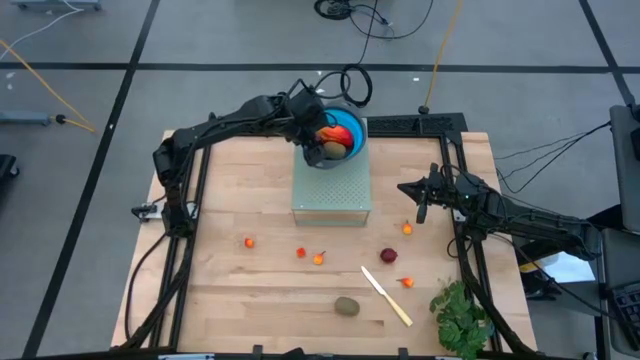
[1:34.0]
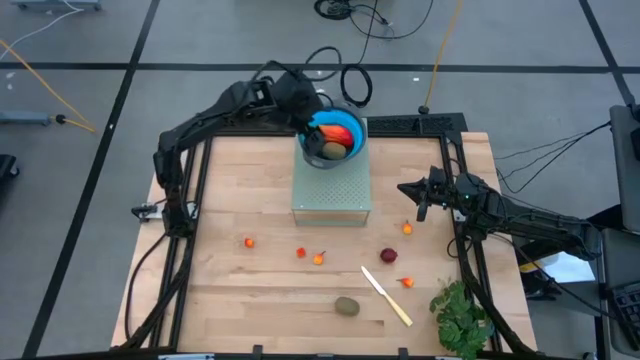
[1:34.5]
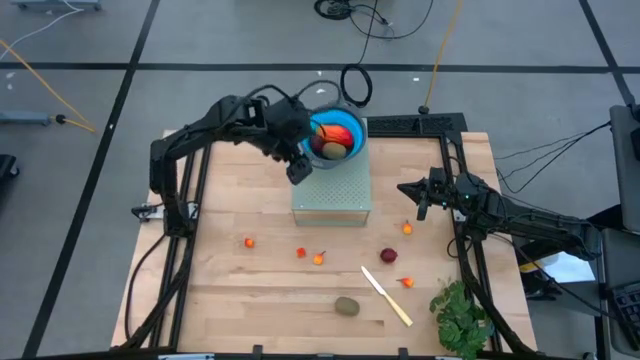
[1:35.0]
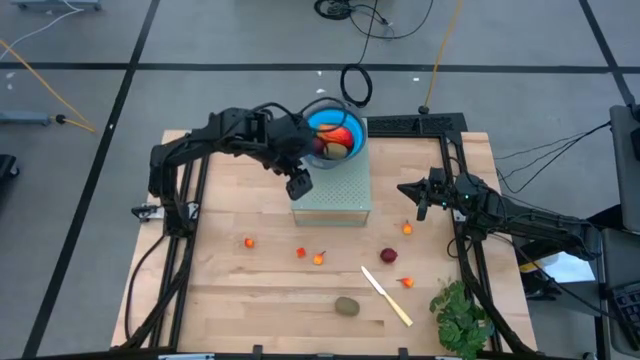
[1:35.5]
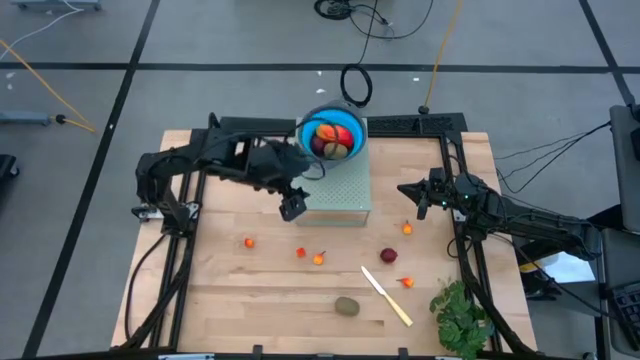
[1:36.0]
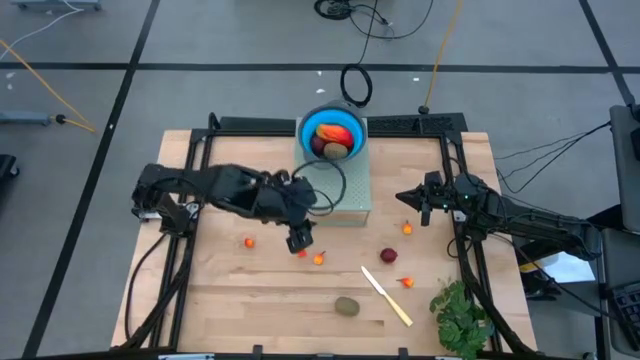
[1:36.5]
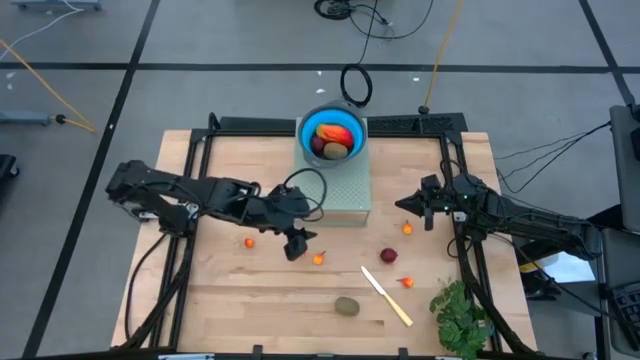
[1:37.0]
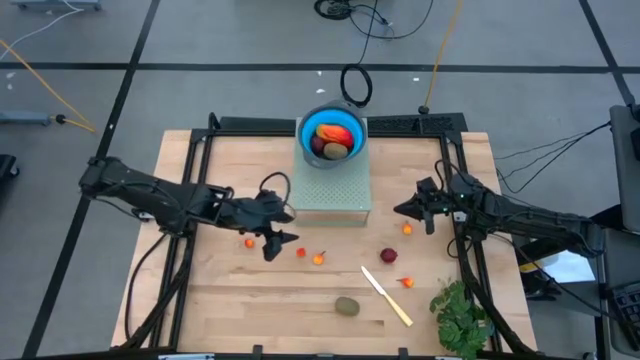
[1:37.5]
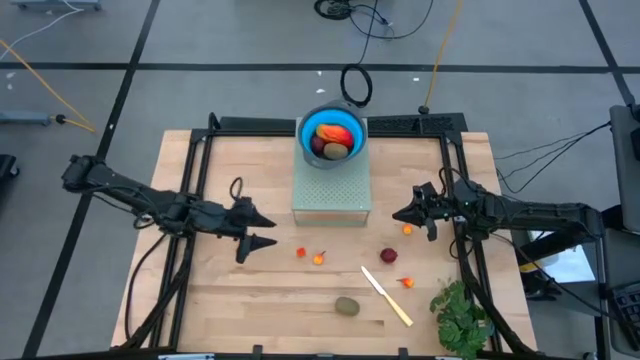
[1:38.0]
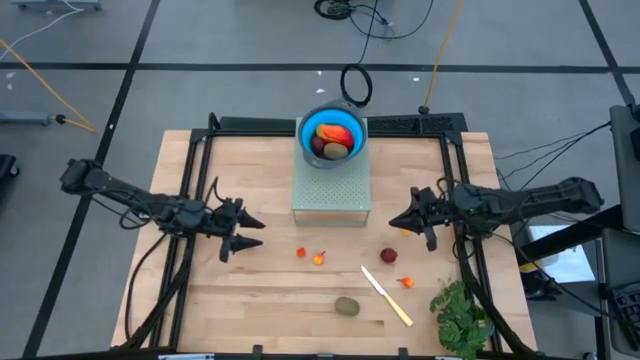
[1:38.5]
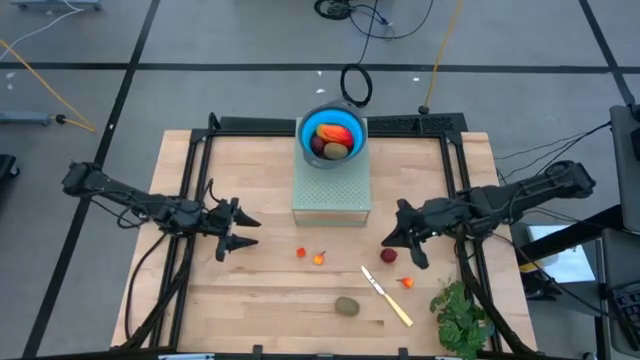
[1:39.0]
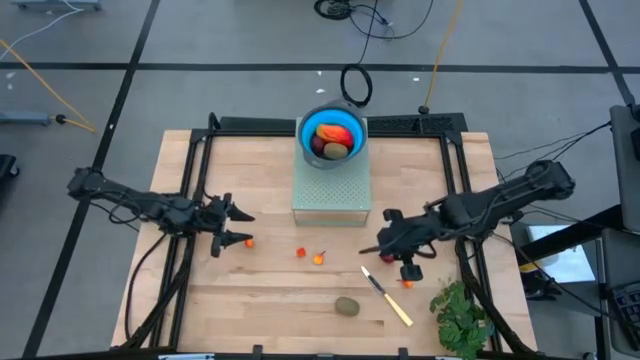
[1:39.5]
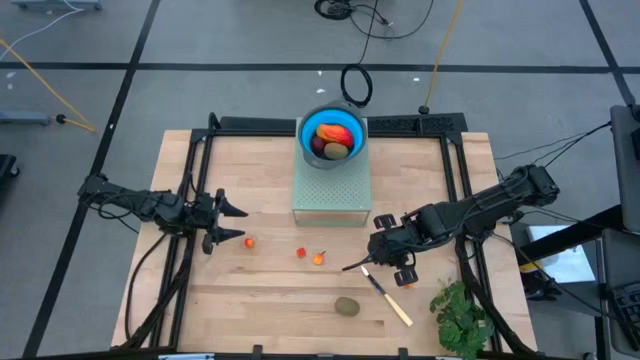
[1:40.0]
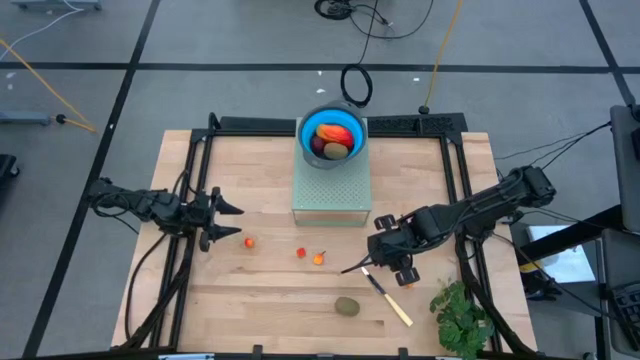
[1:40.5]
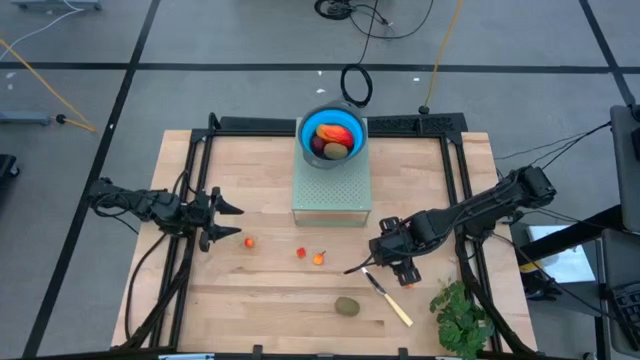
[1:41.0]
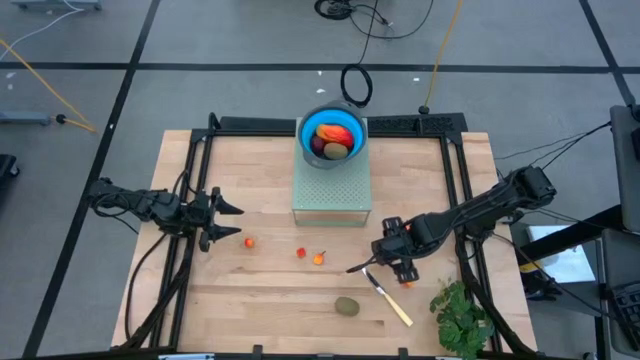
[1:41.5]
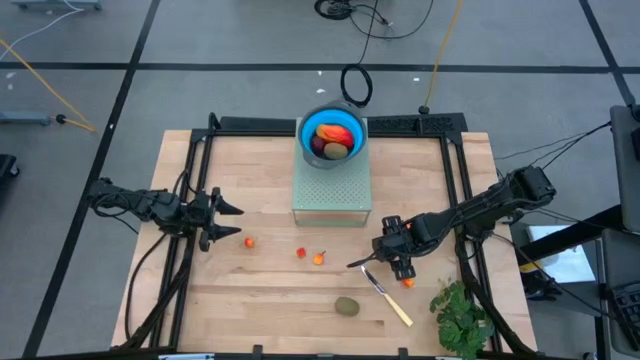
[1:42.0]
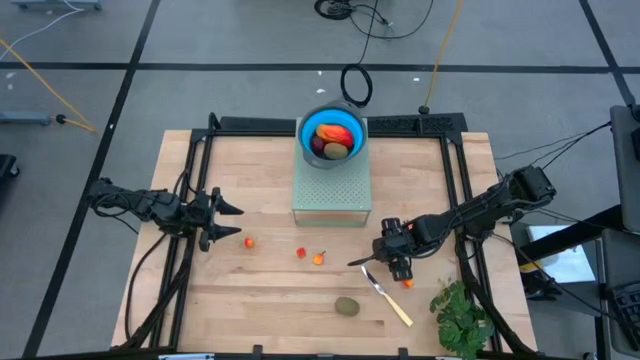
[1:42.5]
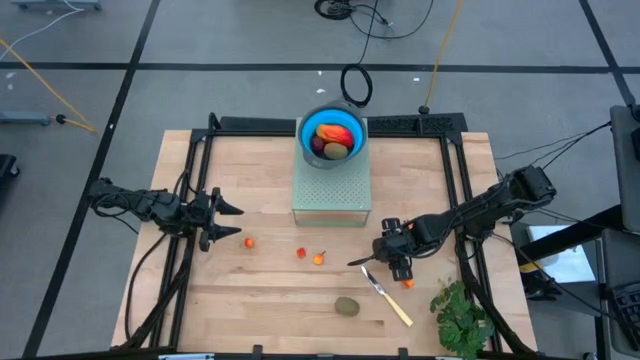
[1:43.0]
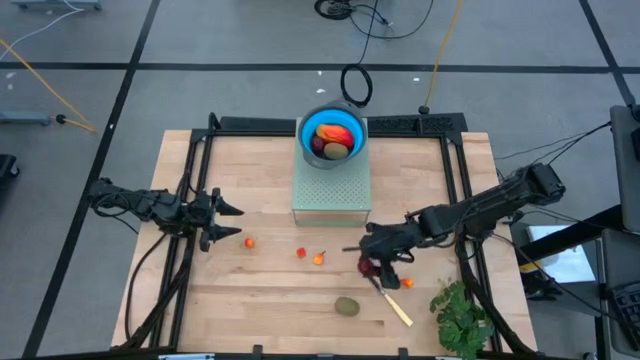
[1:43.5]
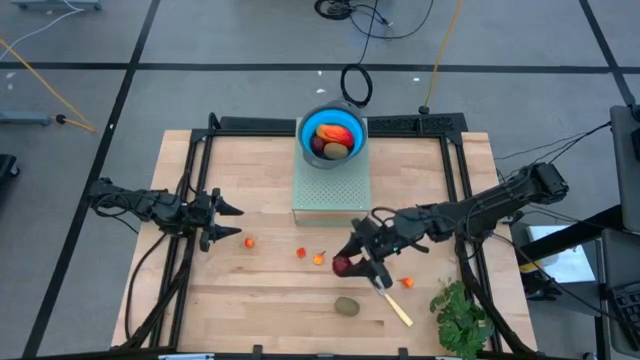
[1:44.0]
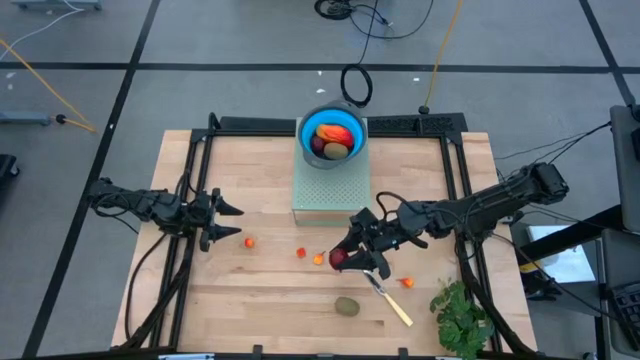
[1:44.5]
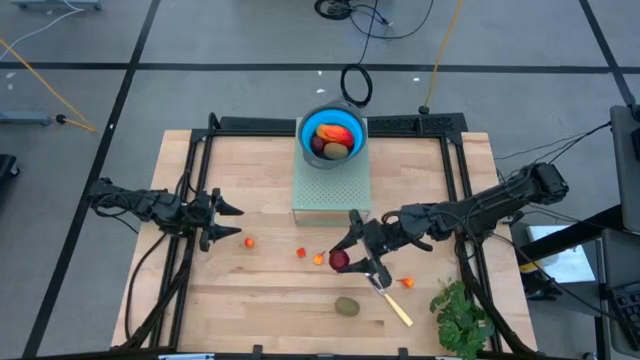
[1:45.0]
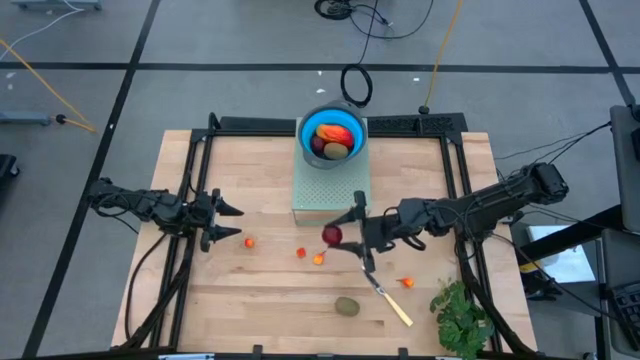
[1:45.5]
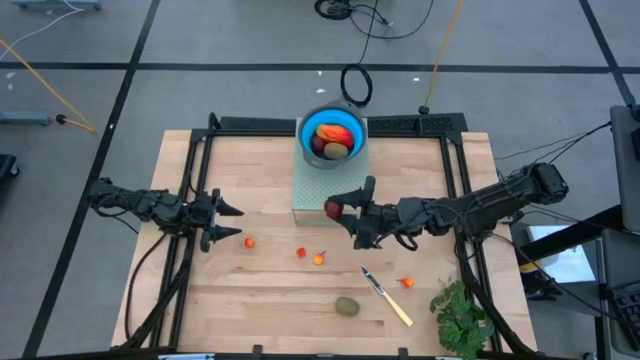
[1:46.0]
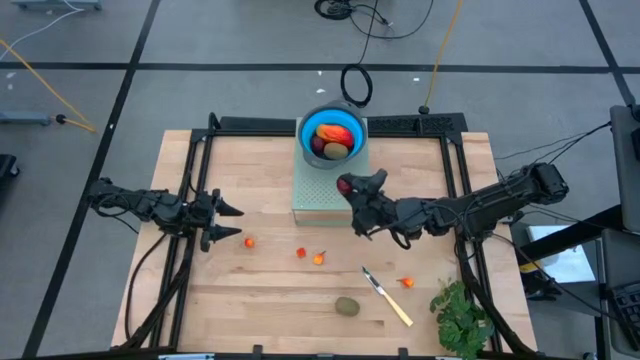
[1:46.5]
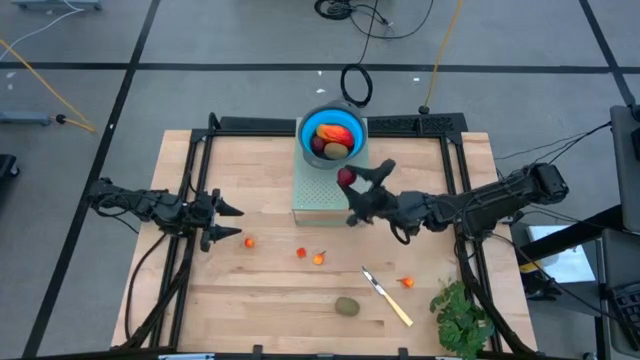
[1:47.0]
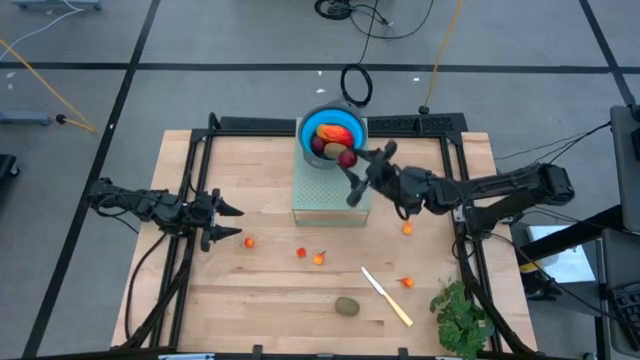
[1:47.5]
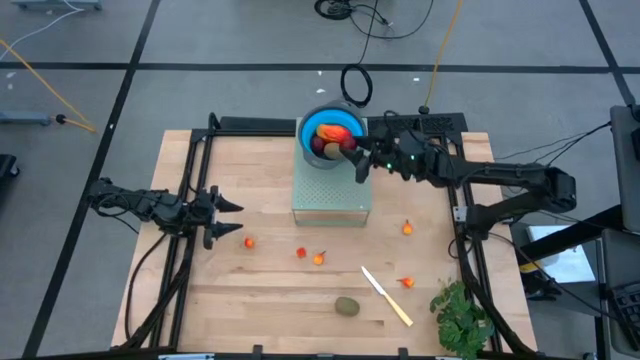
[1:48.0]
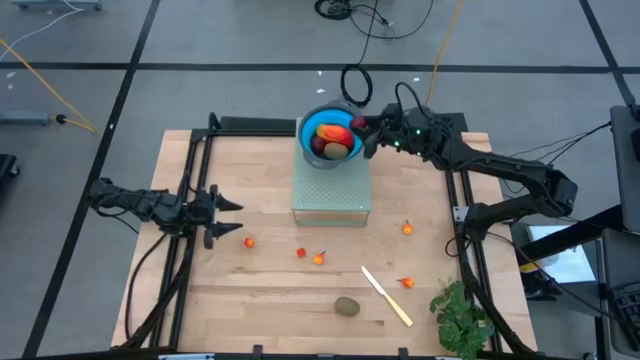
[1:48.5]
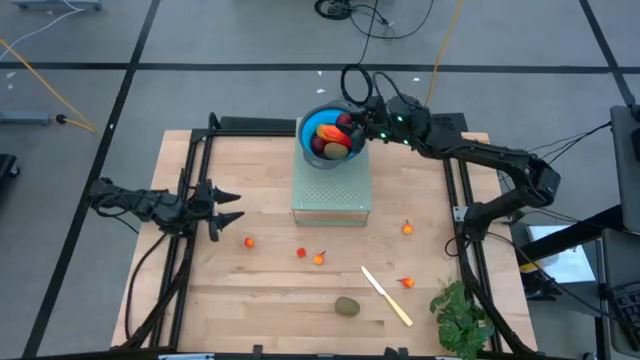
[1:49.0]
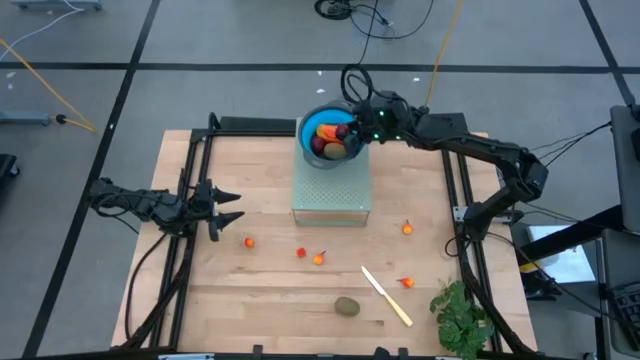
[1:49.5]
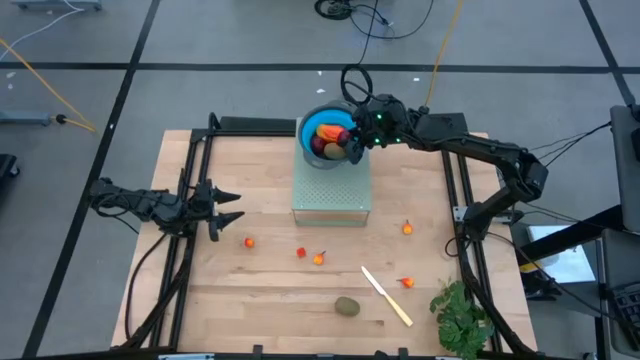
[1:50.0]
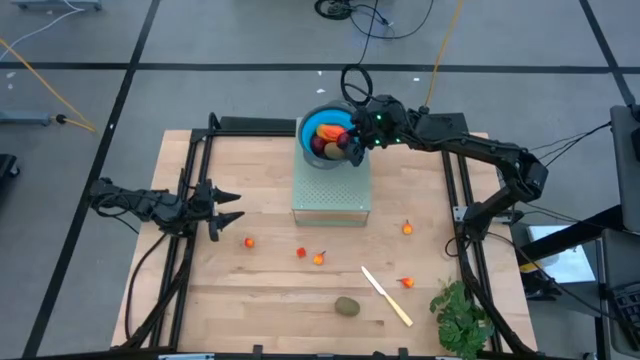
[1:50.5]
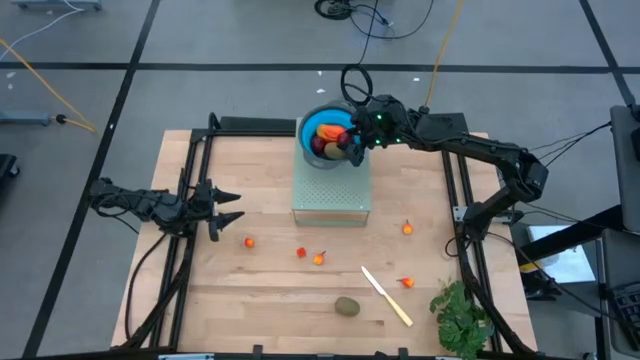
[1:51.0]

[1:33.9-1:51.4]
Task: Pick & Place Fruit
Put the red pomegranate into the blue strainer bowl on the shelf

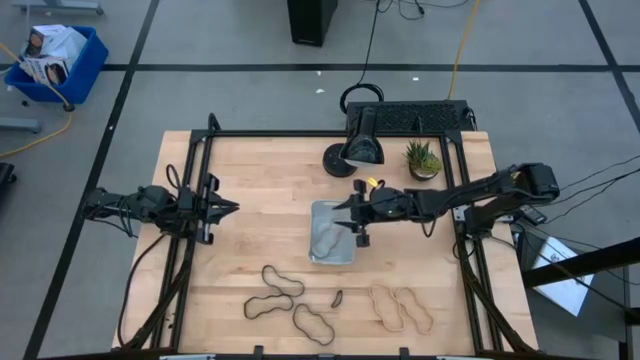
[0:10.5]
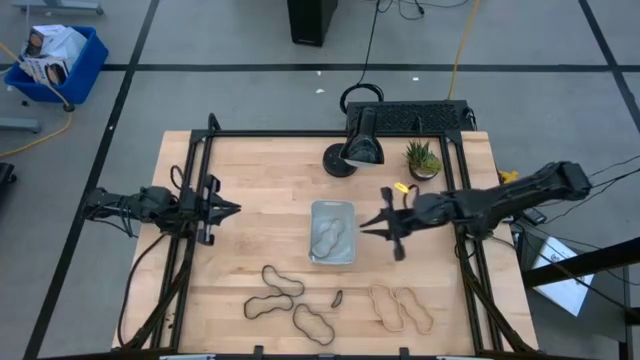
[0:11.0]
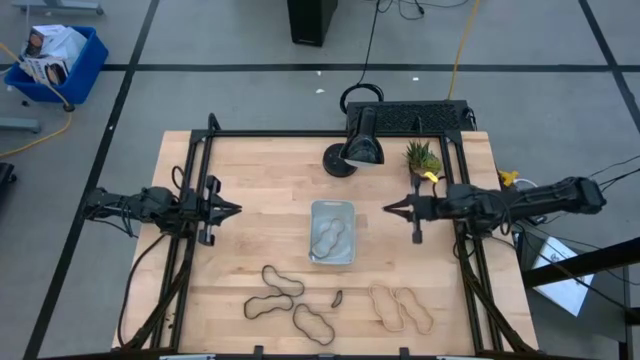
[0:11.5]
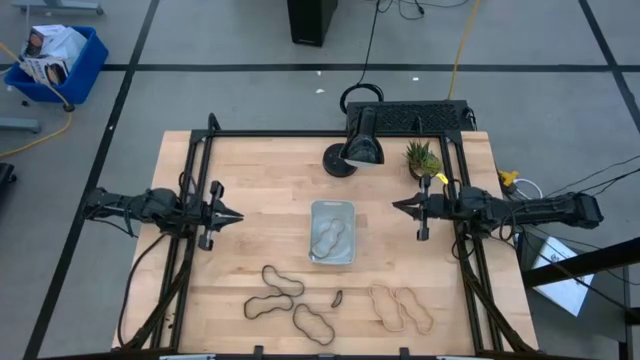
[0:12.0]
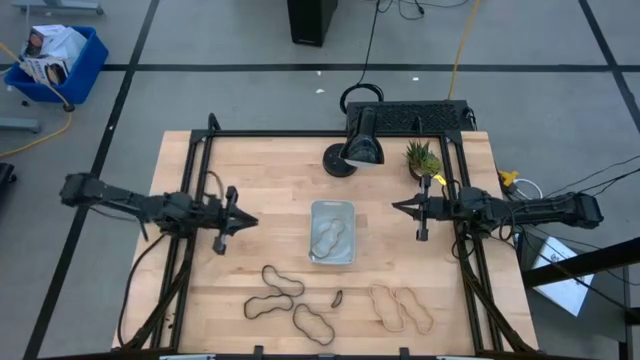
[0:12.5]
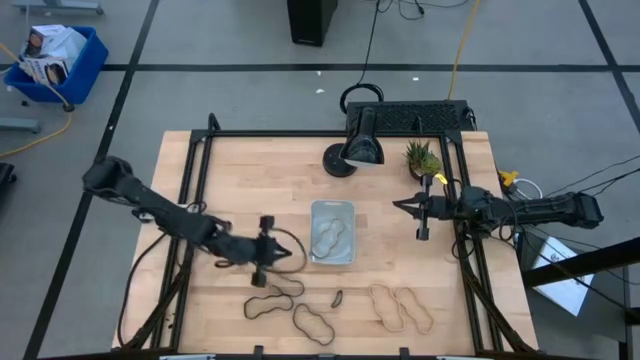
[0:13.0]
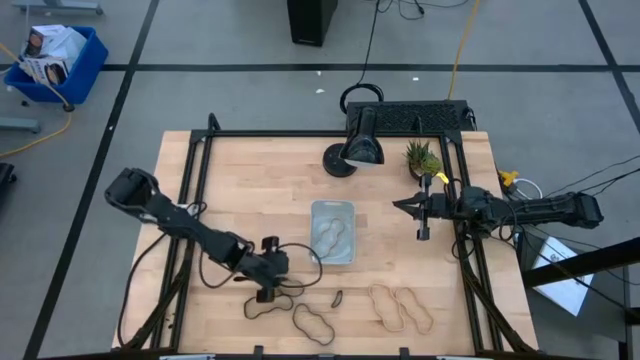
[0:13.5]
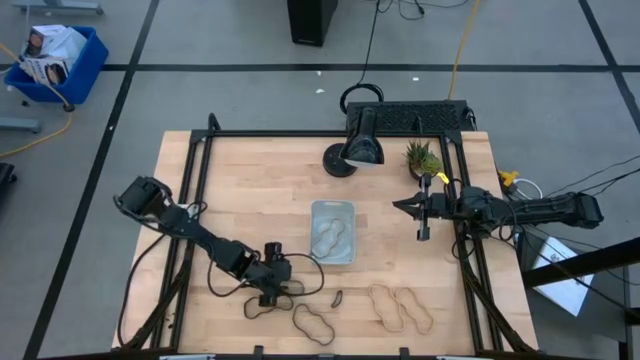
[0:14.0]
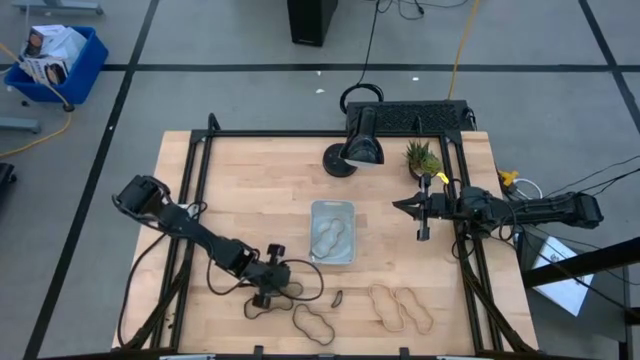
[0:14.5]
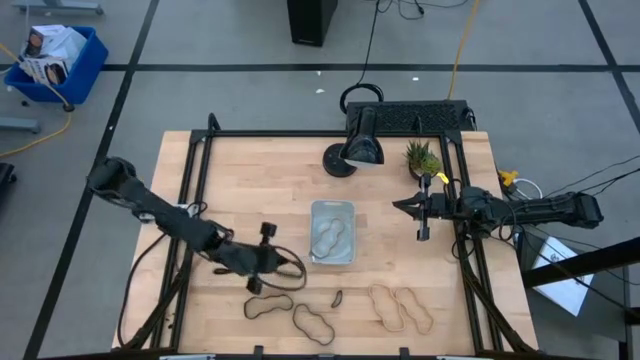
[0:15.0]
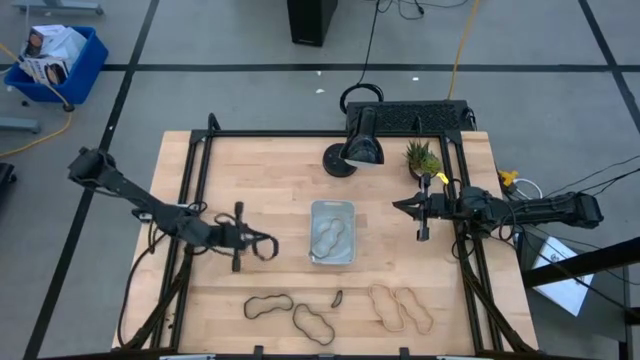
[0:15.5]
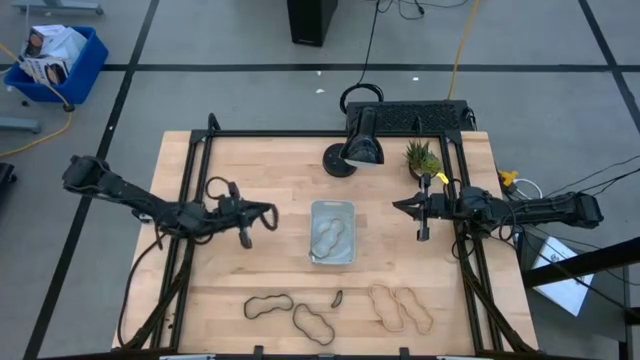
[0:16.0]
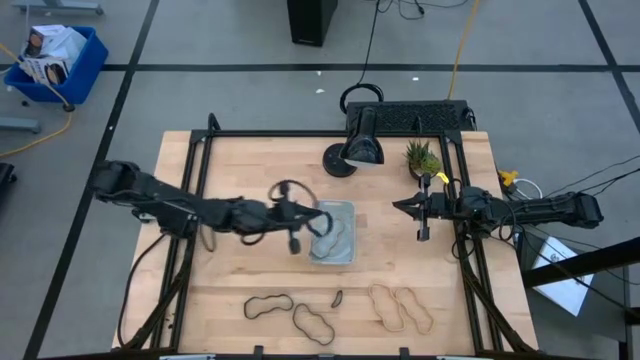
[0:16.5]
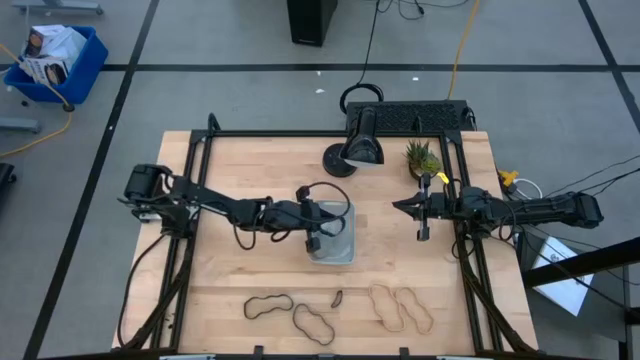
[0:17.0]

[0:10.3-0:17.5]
Task: Pick and place rubber bands into bin
Put the top left black rubber band into the gray bin
